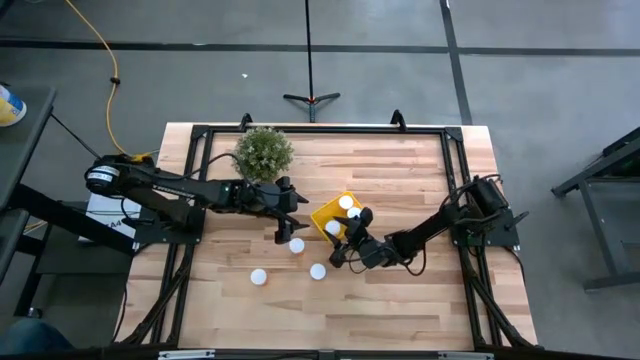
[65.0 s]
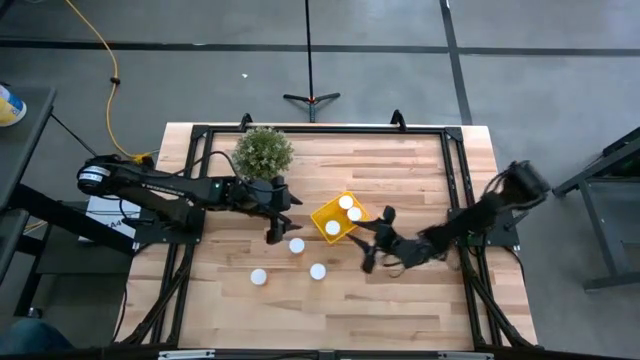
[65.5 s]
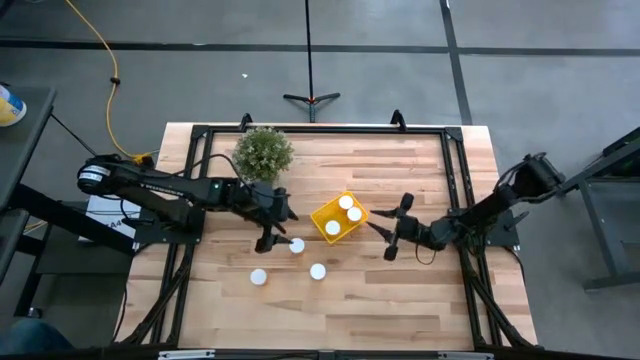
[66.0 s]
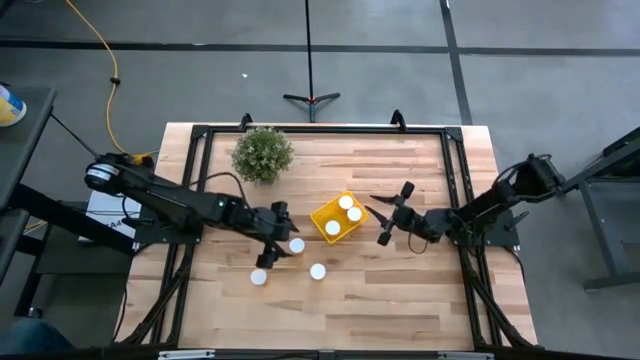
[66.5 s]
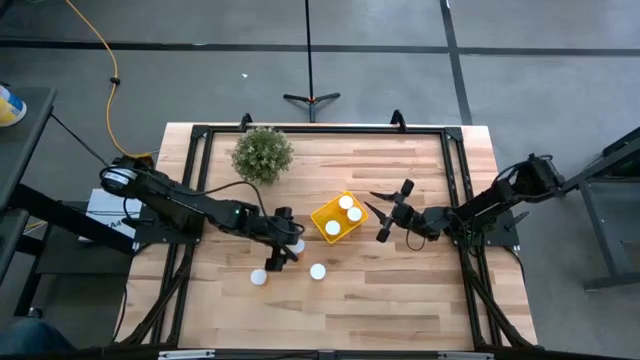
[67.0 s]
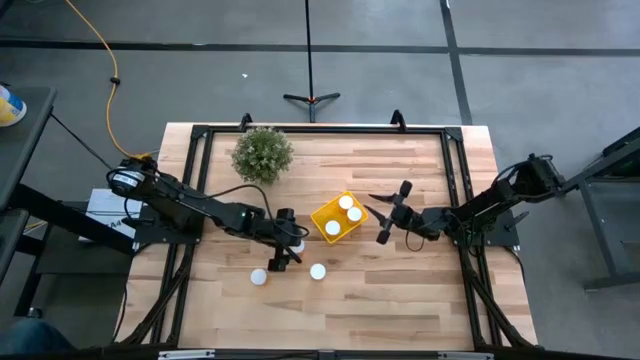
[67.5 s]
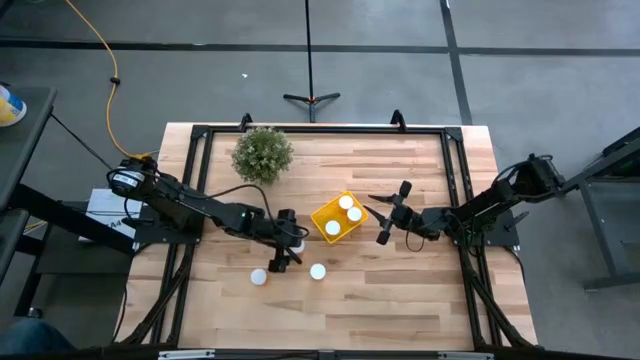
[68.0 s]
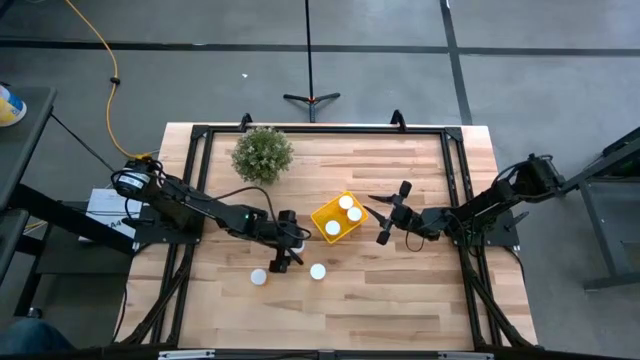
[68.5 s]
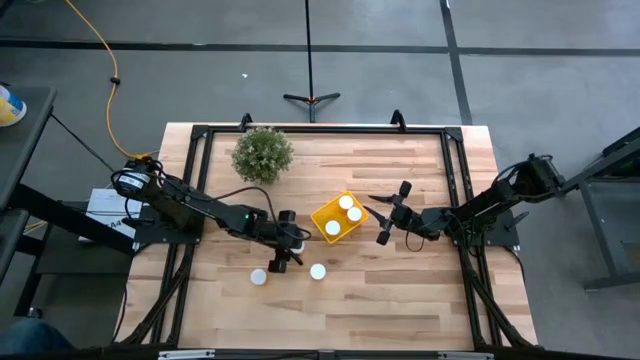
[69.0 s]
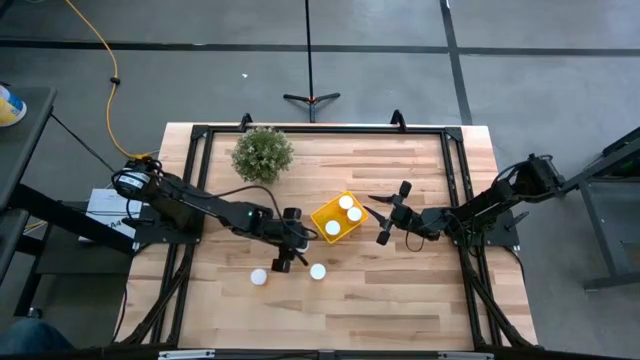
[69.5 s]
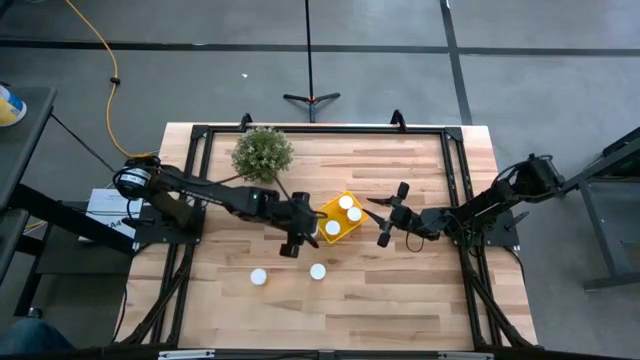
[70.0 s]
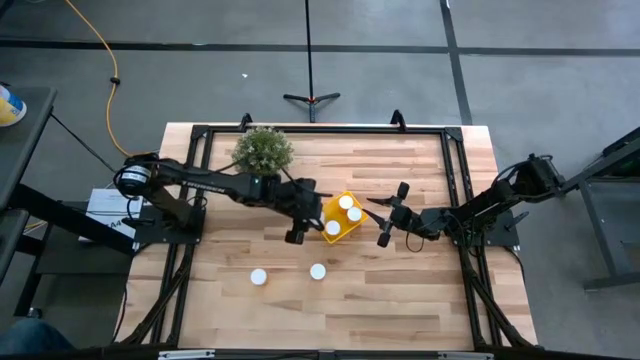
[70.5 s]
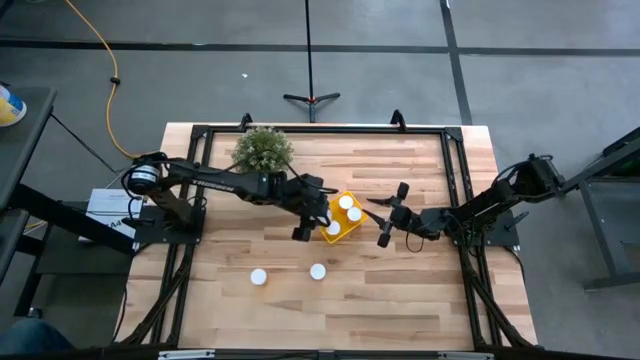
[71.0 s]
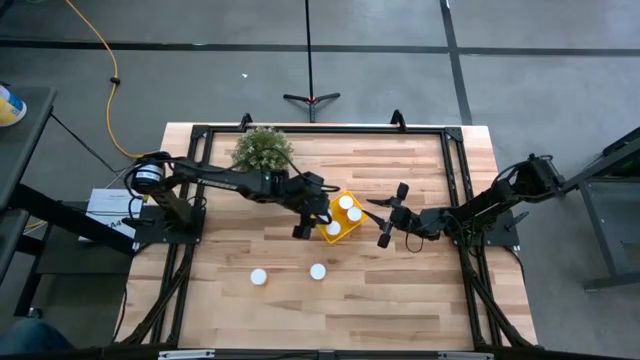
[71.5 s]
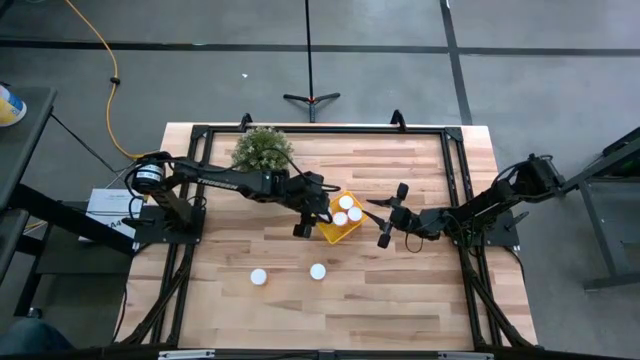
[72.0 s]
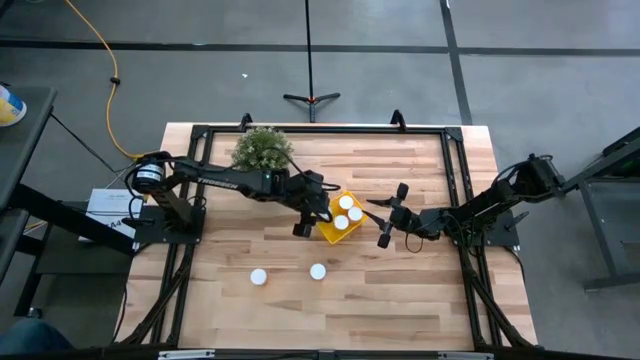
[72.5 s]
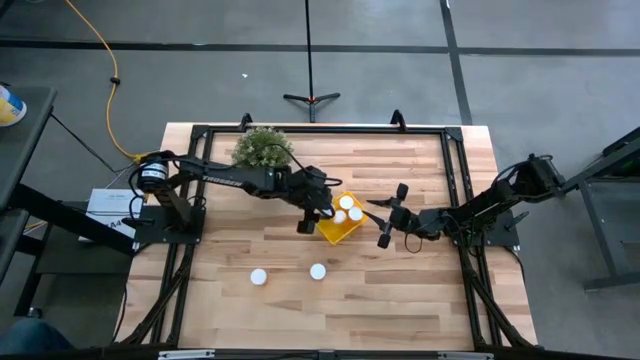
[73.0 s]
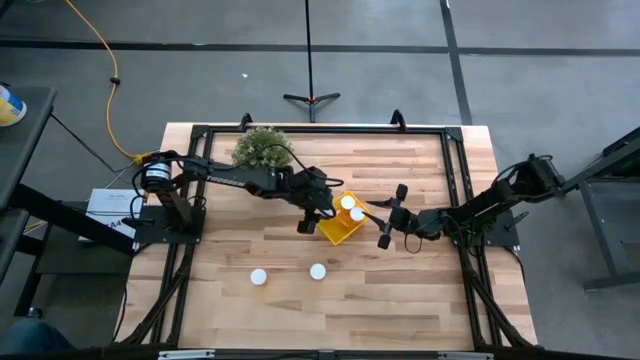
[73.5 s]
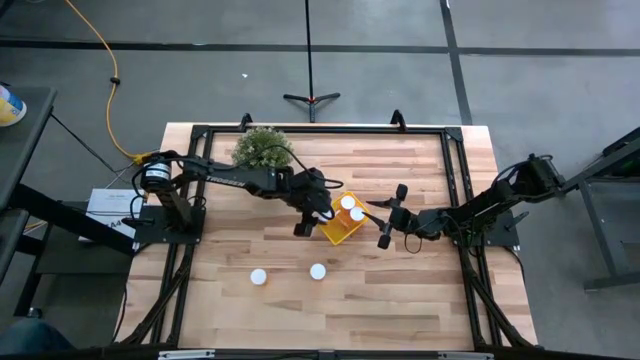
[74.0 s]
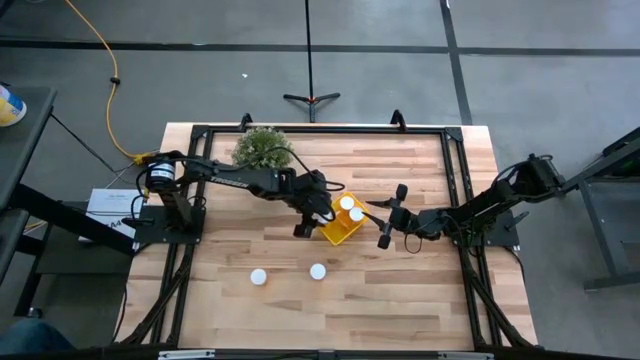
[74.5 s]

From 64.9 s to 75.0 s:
Task: Pick and place pill bottles into a basket
Put the top orange pill bottle into the top left corner of the yellow basket

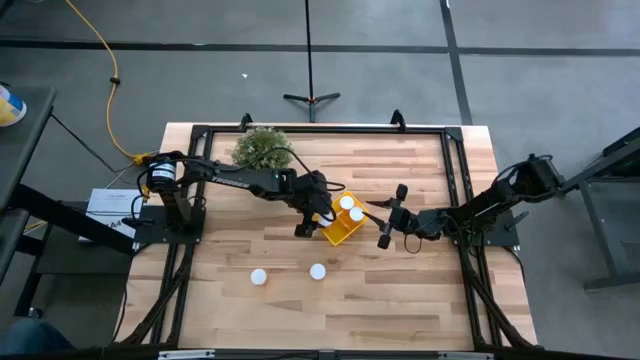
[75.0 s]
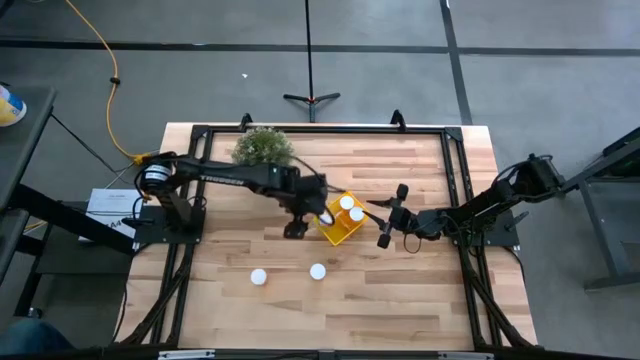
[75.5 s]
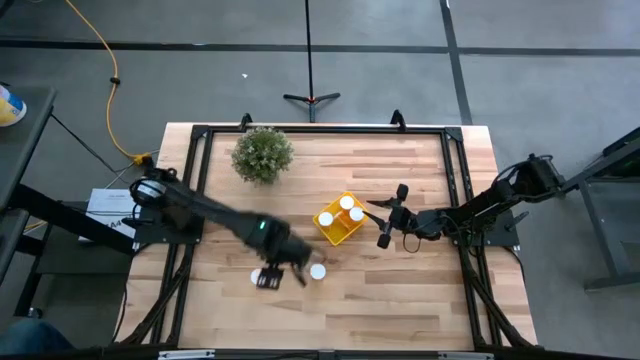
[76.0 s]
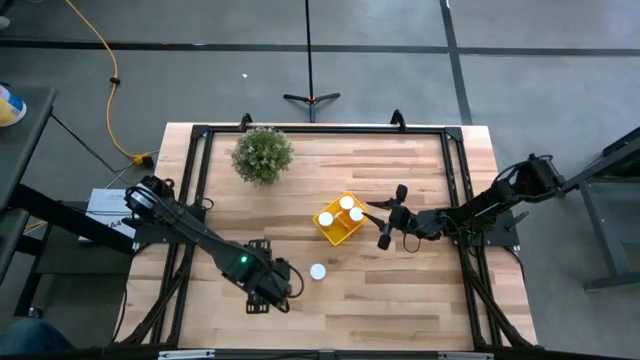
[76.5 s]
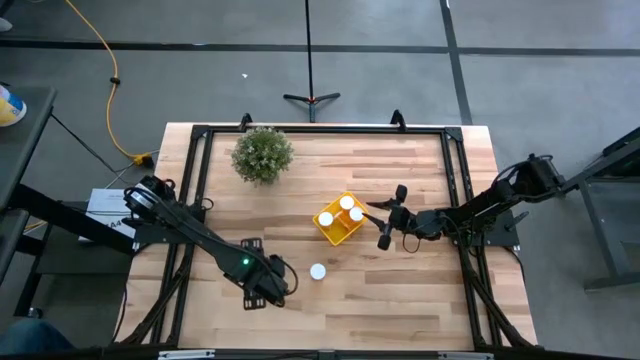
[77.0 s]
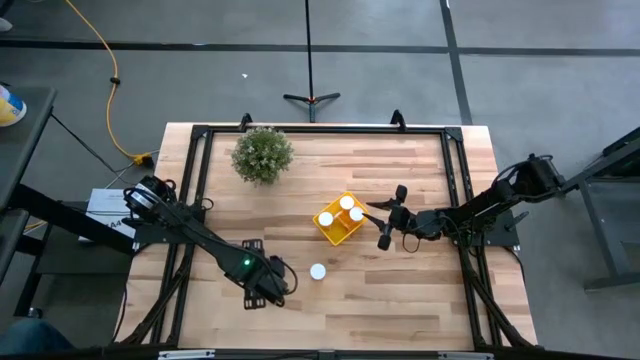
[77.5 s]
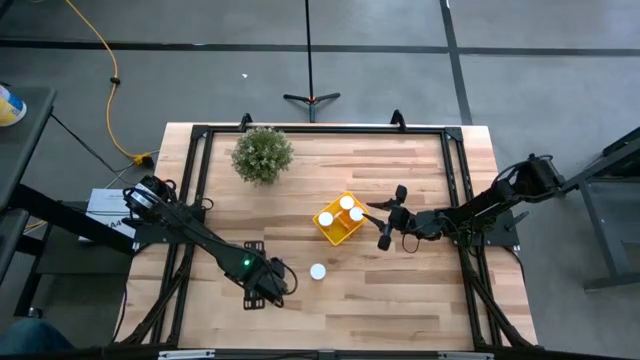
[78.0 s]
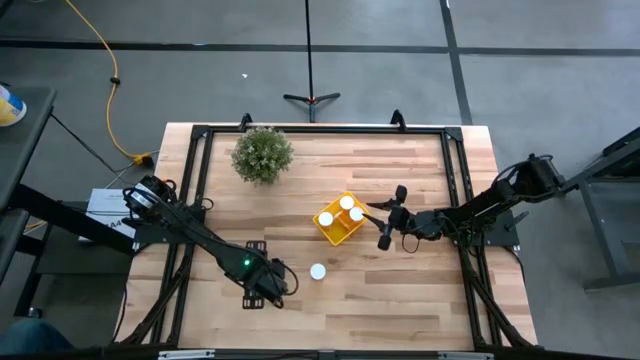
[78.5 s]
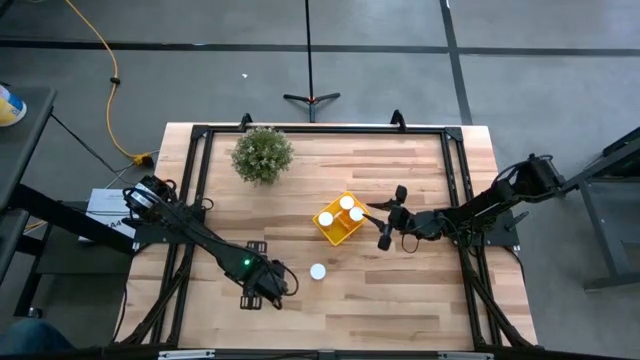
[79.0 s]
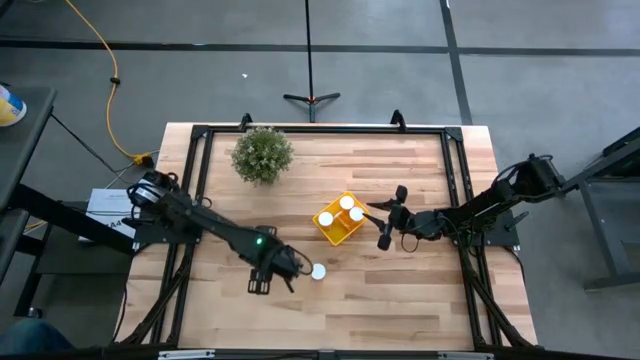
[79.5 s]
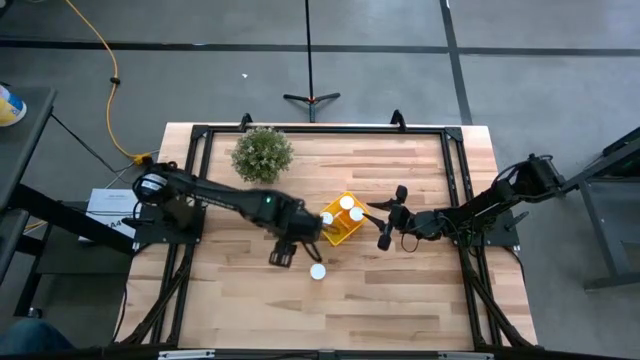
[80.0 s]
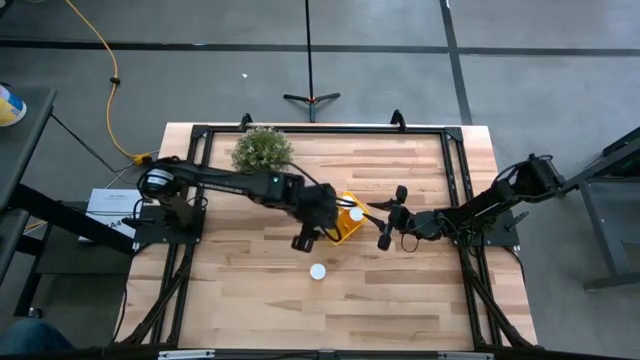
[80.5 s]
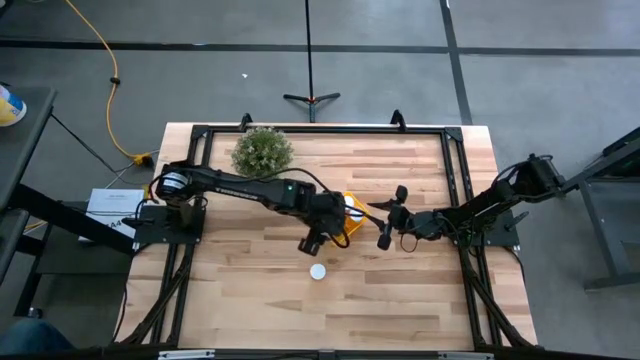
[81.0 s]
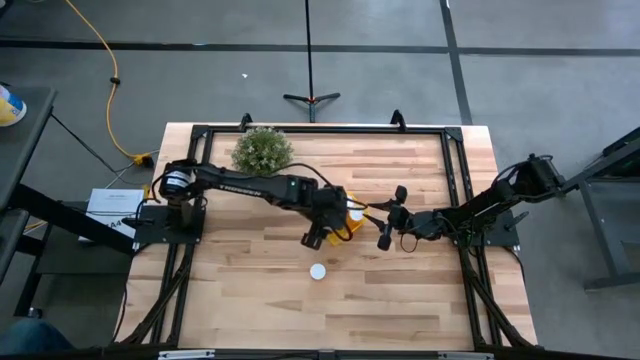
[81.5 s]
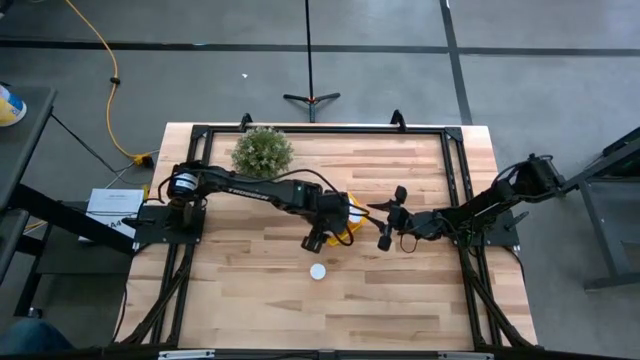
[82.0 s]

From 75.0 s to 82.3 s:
Put the left orange pill bottle into the bottom left corner of the yellow basket

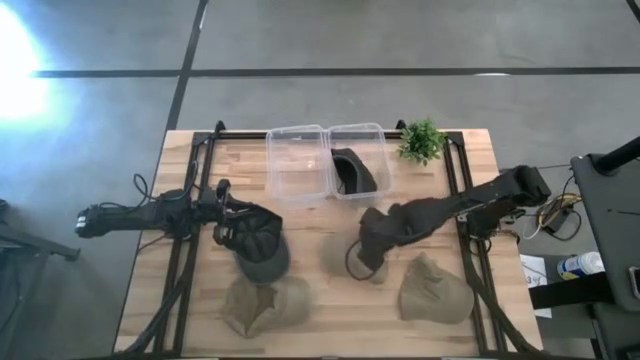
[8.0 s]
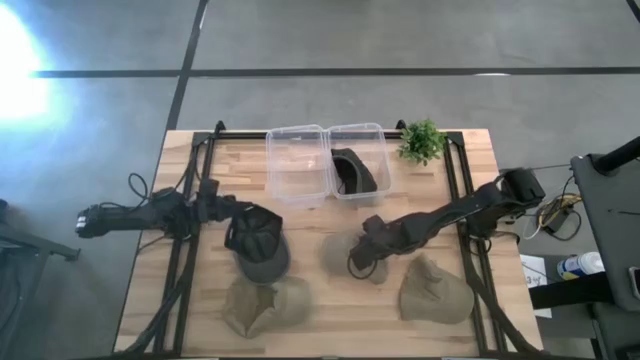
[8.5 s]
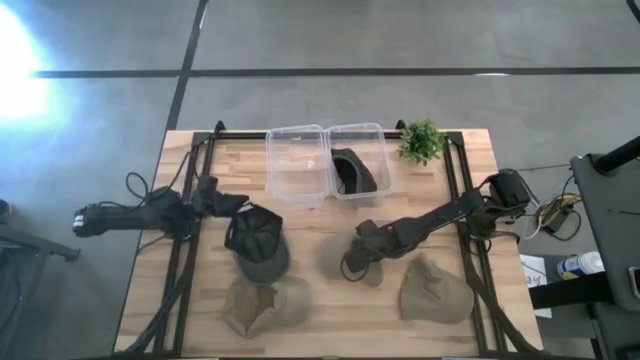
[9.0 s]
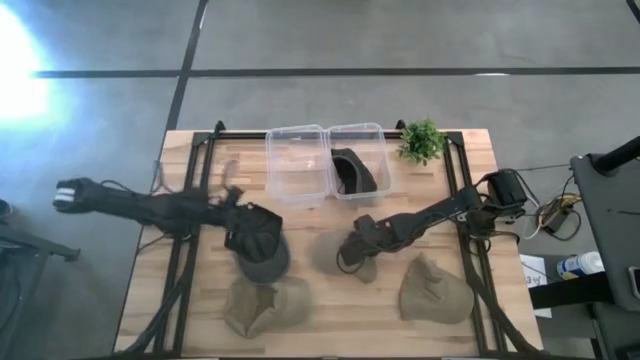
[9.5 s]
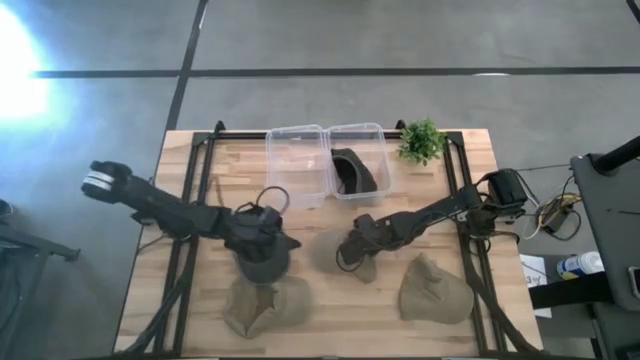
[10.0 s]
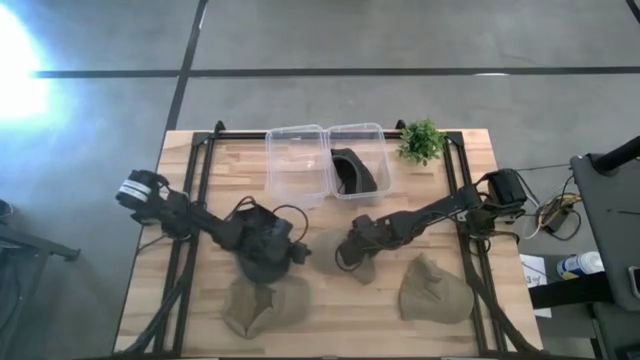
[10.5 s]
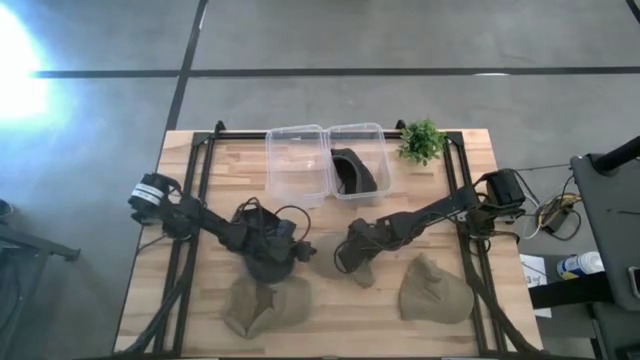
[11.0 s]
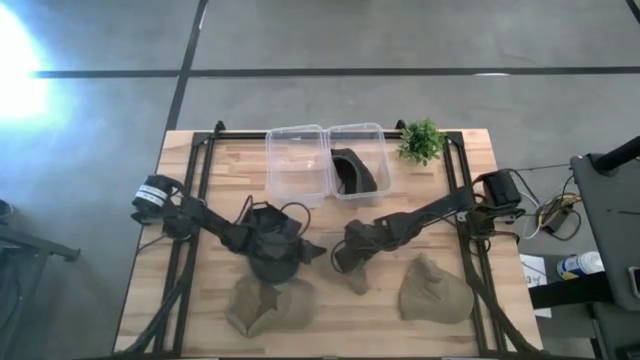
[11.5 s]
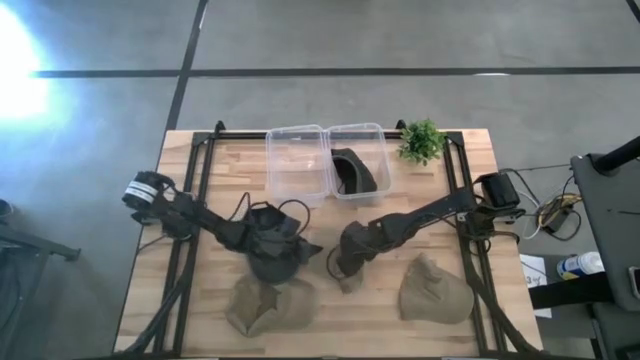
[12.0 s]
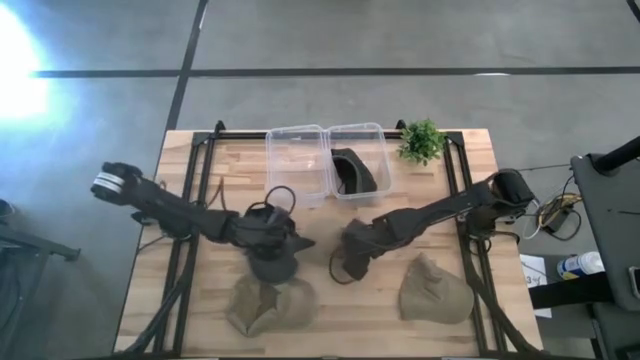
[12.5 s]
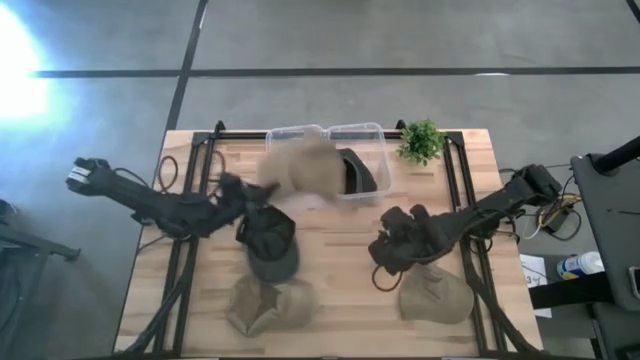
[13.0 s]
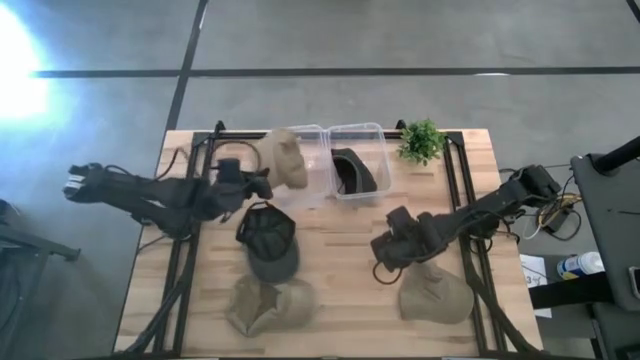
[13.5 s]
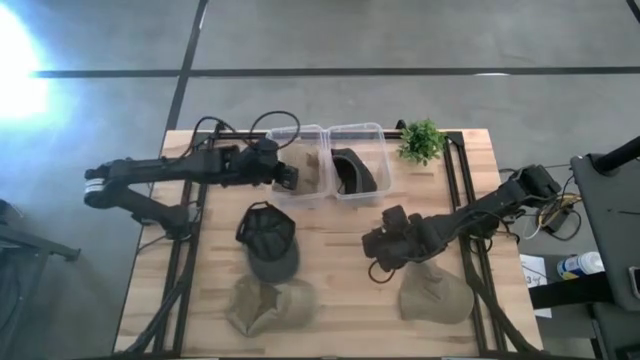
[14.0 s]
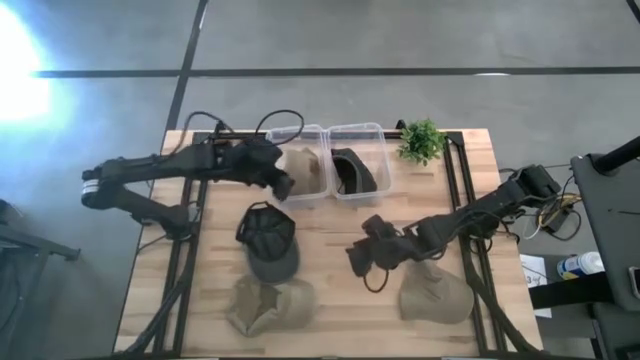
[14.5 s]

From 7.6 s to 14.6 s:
Task: Pick & Place hat
Put the top brown cap into the left transparent bin
